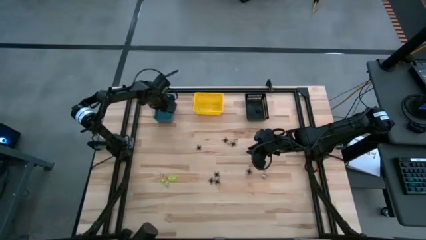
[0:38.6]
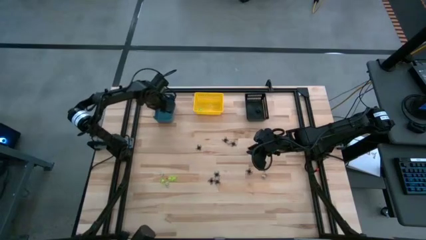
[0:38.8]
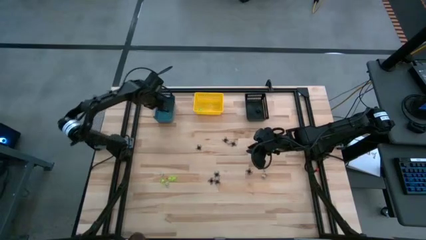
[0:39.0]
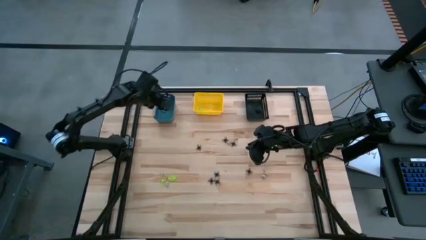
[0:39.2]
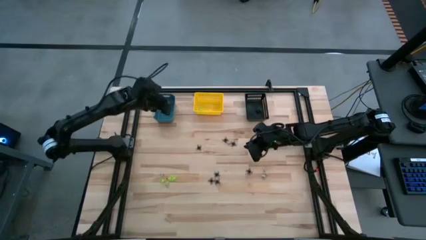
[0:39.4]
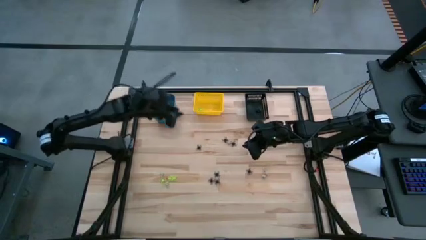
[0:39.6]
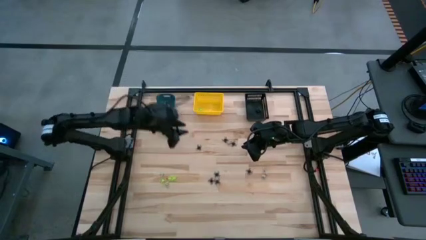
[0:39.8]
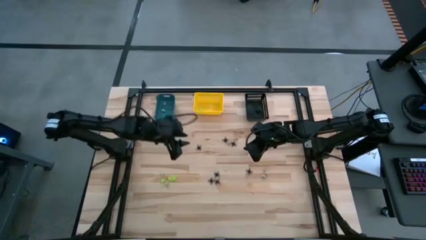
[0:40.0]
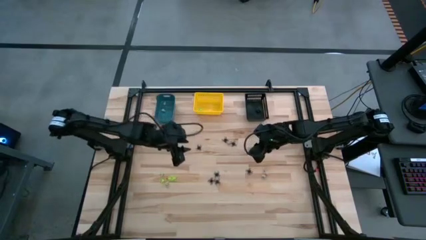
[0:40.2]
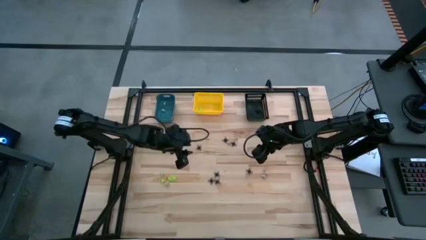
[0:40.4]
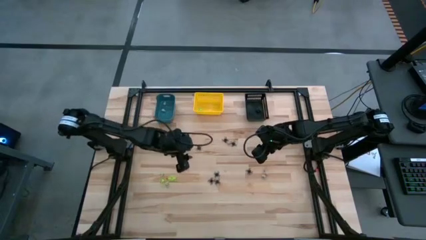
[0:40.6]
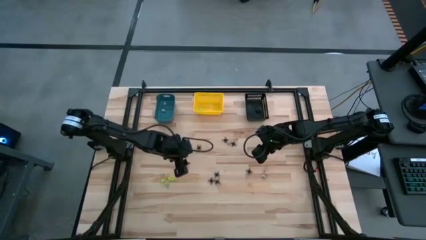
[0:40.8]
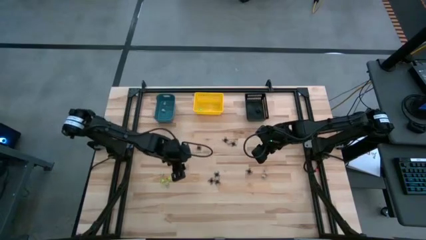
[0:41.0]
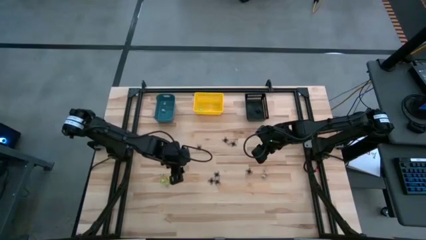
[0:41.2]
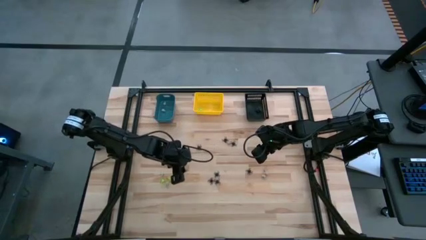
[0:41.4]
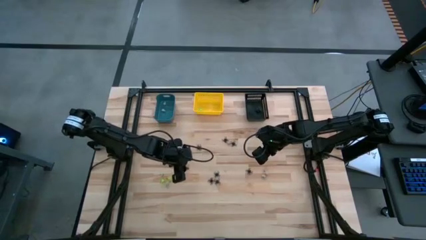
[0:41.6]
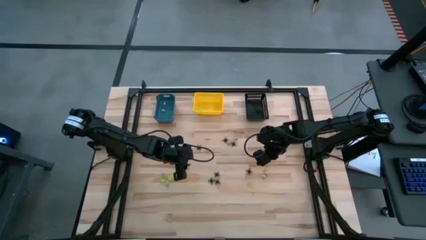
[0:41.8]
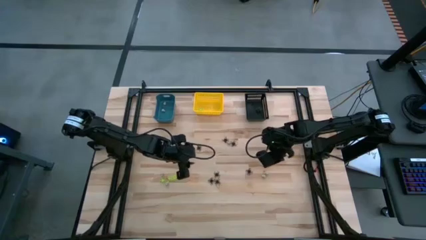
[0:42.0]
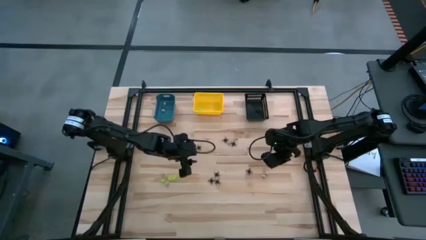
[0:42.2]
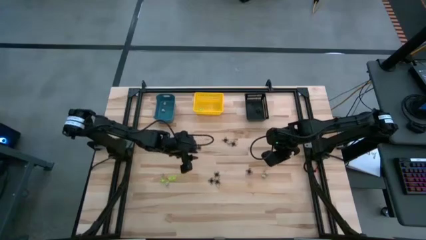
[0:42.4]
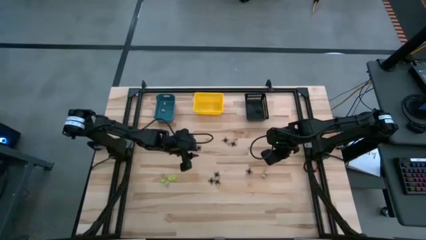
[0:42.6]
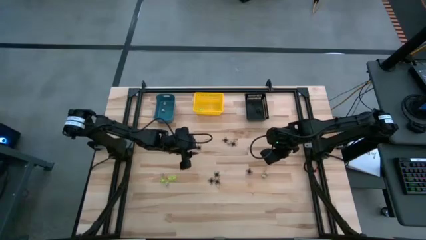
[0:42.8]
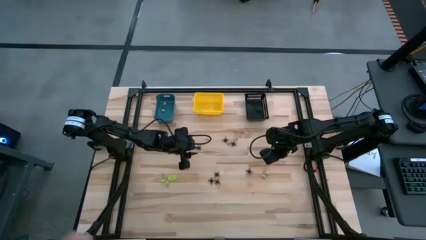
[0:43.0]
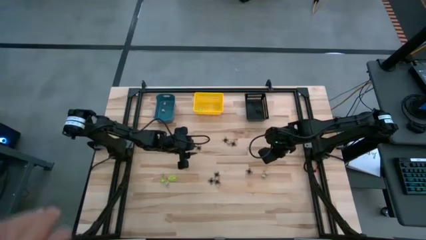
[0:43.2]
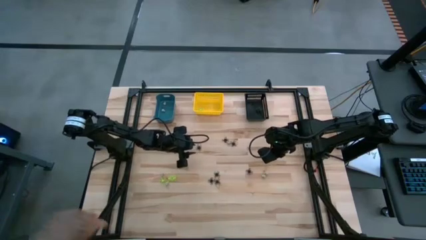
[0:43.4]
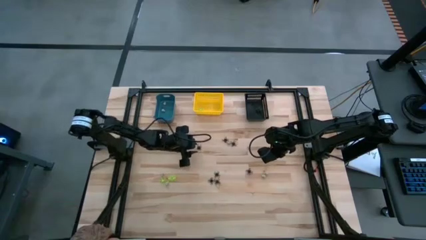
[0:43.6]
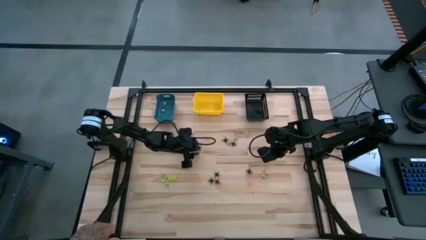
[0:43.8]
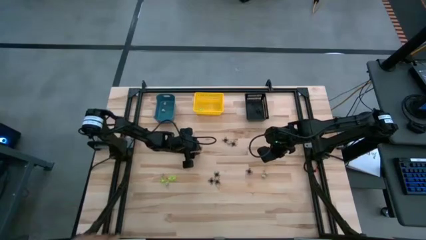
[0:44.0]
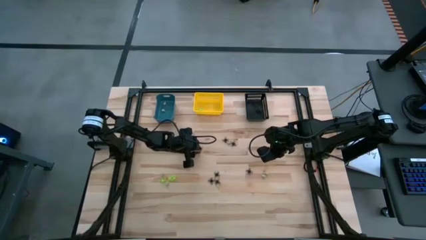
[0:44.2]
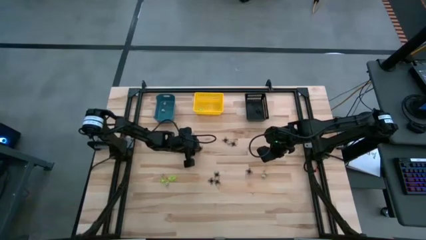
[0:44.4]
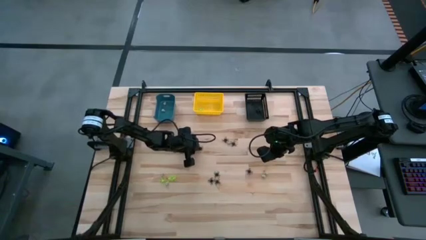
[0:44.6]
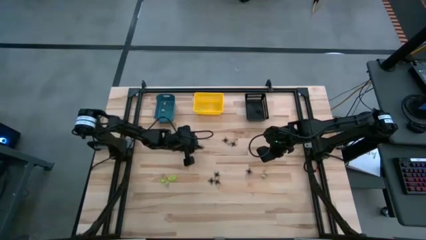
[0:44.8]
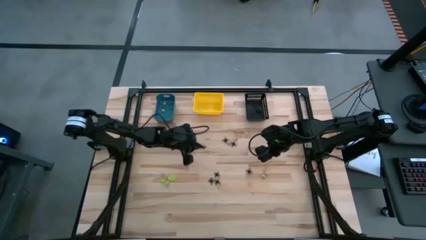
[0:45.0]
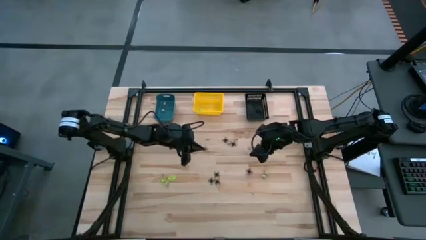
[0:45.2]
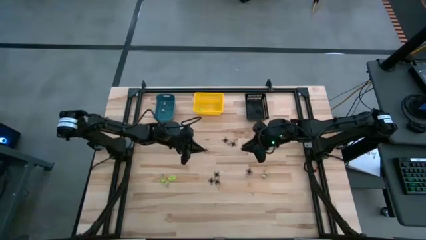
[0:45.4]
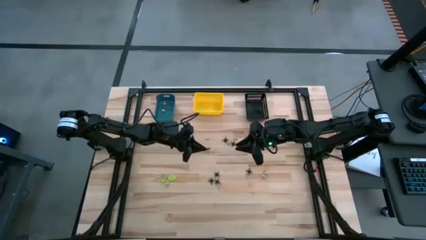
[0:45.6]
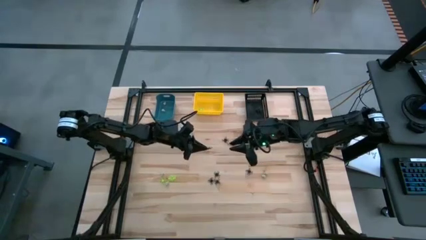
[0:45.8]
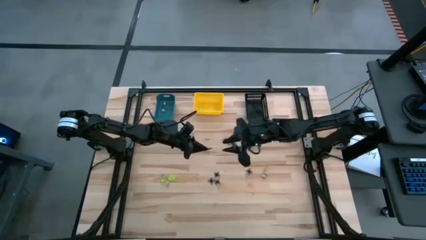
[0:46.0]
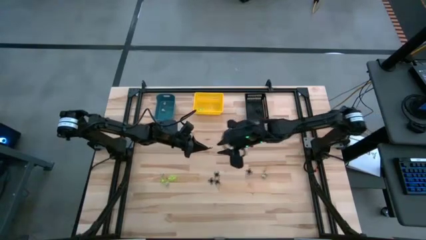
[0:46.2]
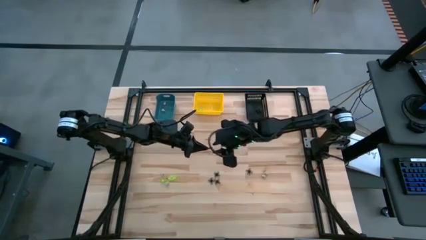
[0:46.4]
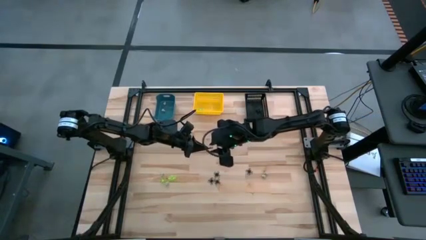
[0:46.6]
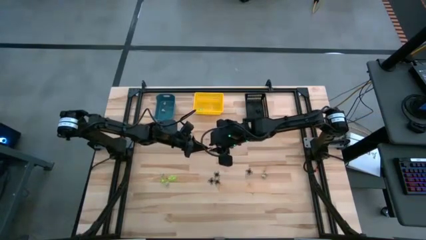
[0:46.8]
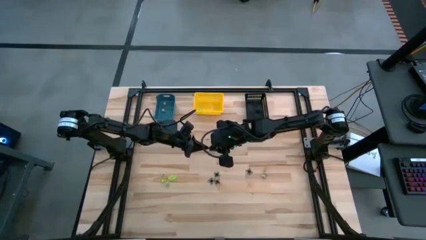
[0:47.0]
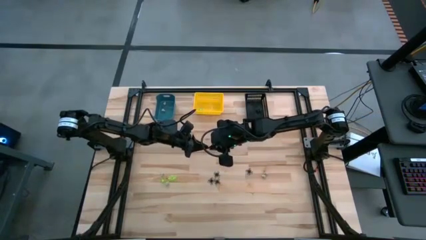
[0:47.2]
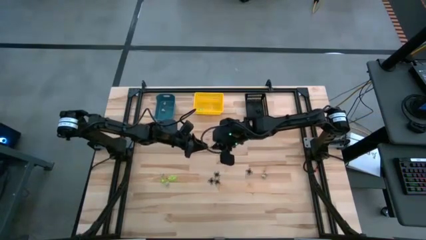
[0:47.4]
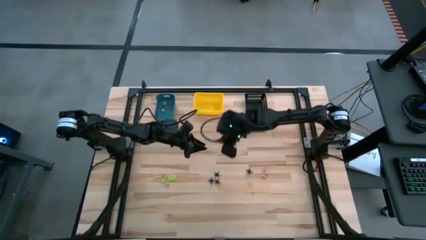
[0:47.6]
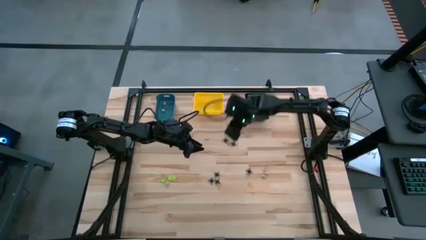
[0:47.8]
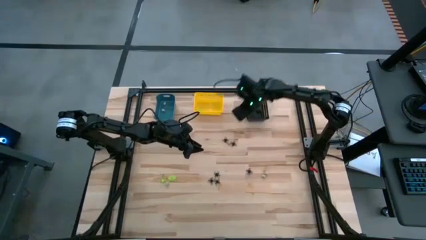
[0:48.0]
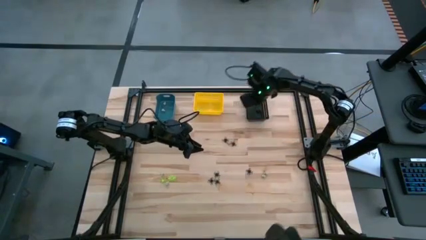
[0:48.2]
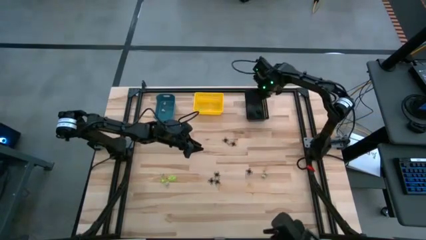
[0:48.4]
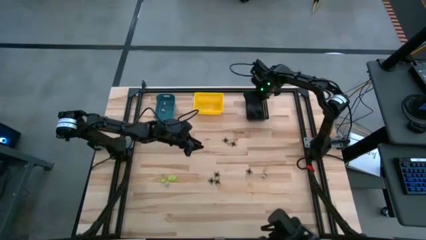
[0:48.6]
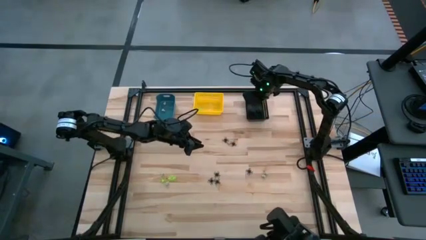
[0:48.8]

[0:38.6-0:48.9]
Task: Sort Halloween decoration
Put the black spider toy into the black bin

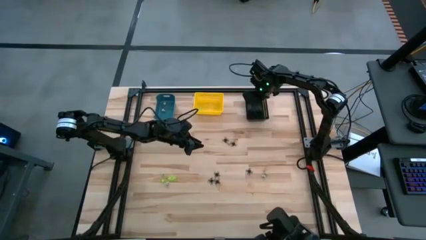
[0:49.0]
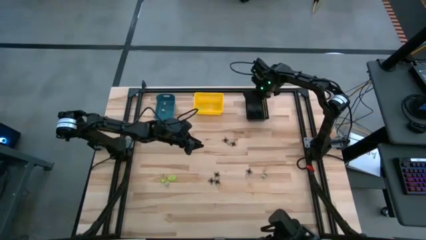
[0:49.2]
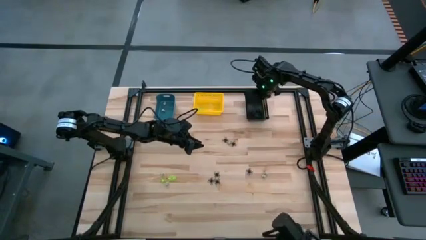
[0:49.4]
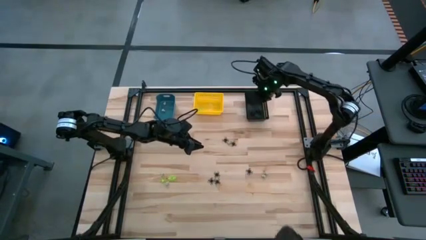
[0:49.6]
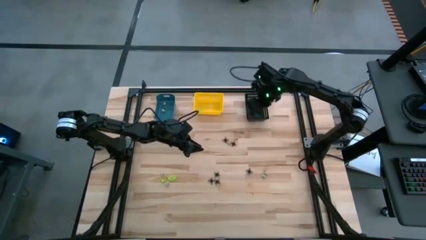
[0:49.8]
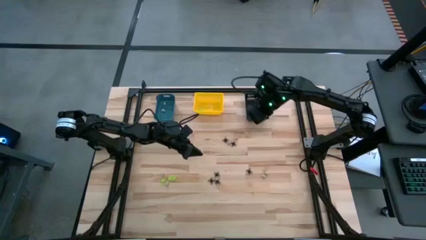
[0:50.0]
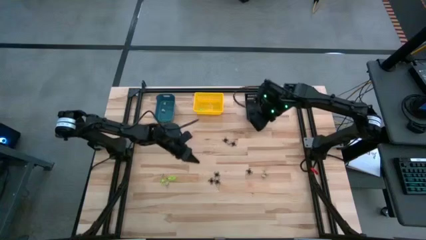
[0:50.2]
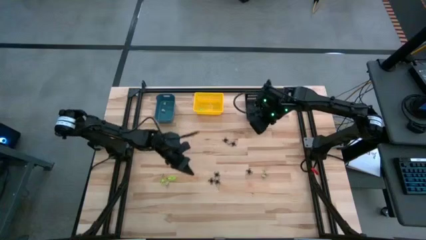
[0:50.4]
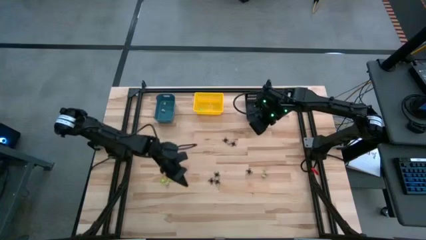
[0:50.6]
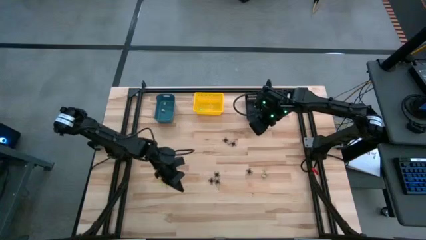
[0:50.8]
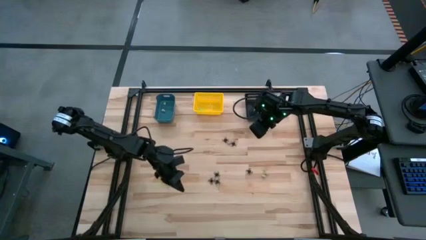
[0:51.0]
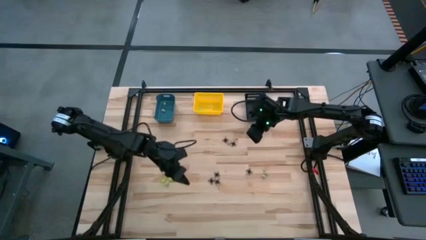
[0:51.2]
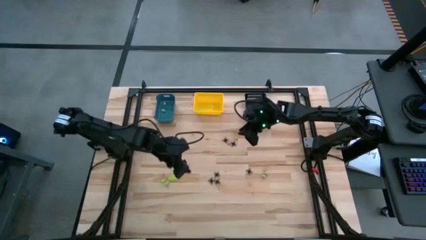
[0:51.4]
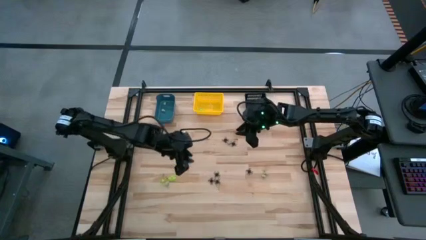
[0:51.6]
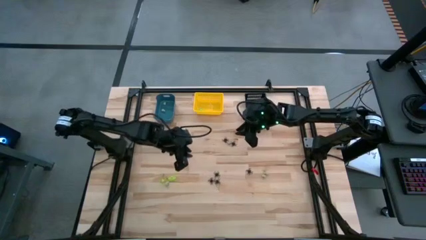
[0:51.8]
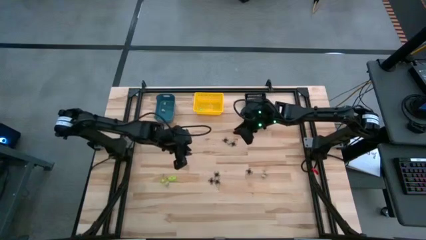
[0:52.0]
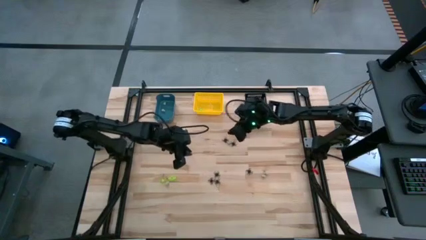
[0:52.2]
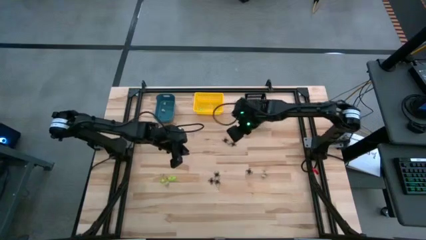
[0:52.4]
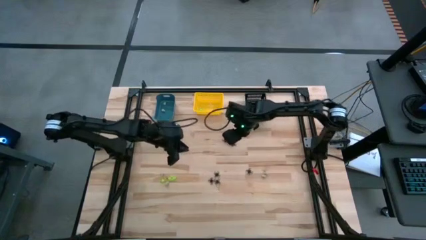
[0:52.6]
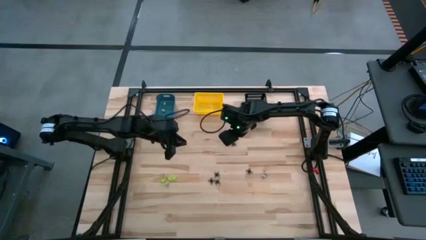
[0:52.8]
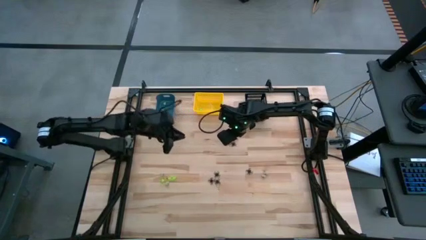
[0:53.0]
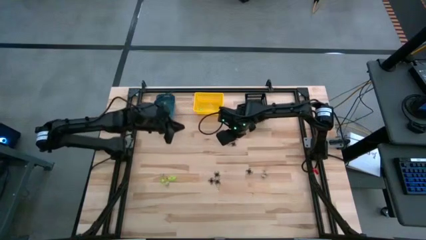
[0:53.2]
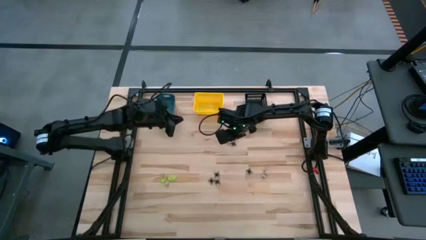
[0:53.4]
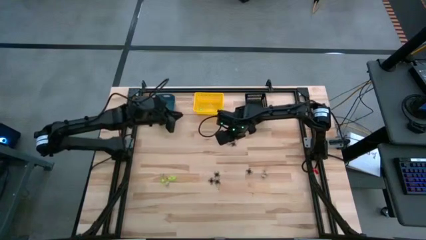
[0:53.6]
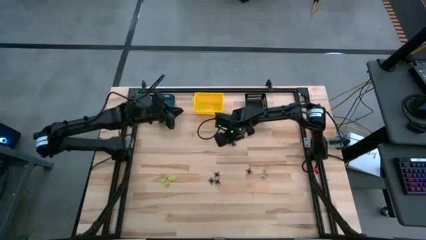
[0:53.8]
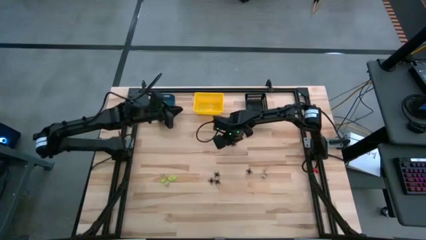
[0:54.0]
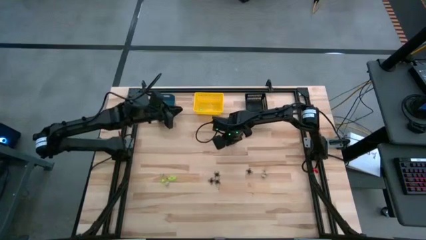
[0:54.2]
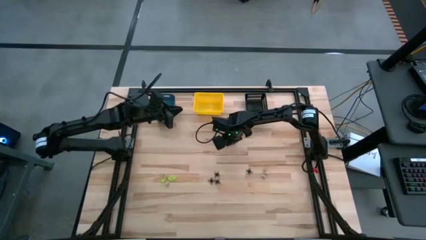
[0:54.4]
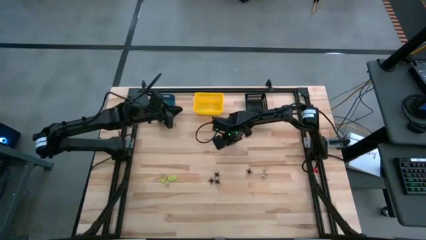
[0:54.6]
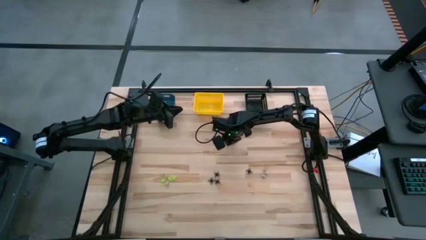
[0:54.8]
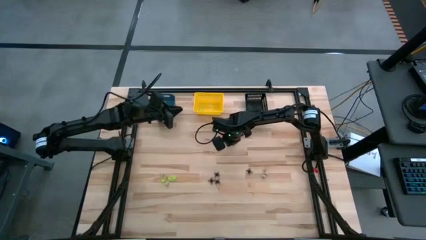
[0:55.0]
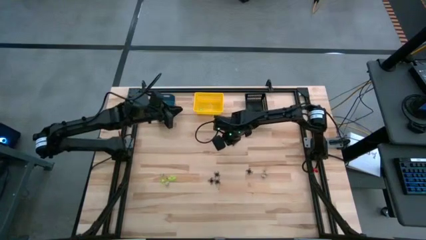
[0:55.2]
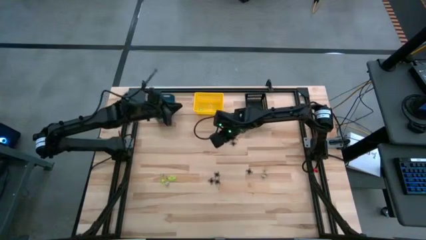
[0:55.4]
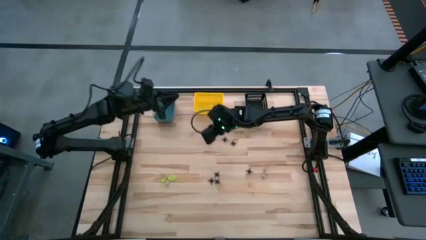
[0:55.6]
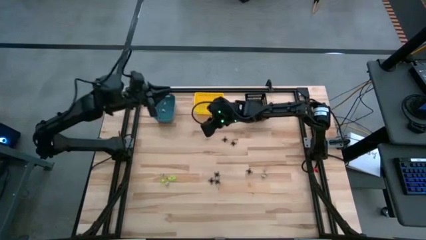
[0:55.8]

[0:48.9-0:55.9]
Put the gray skull toy into the blue bin
